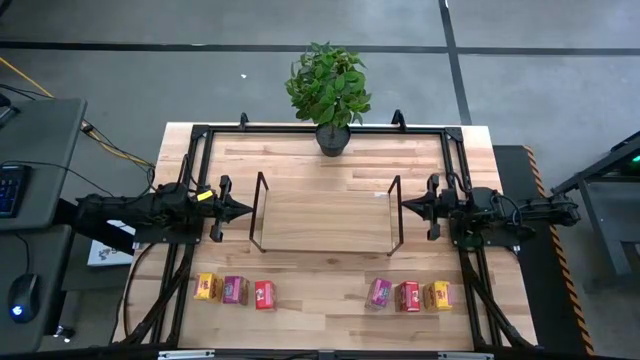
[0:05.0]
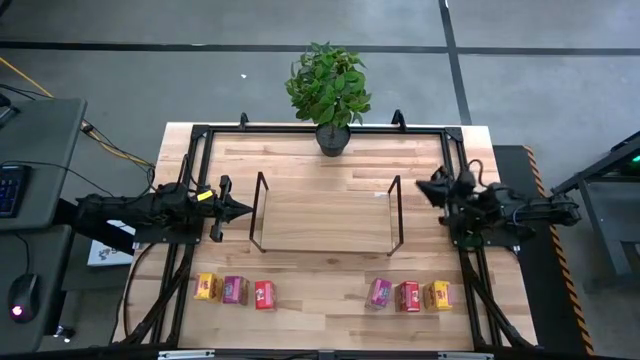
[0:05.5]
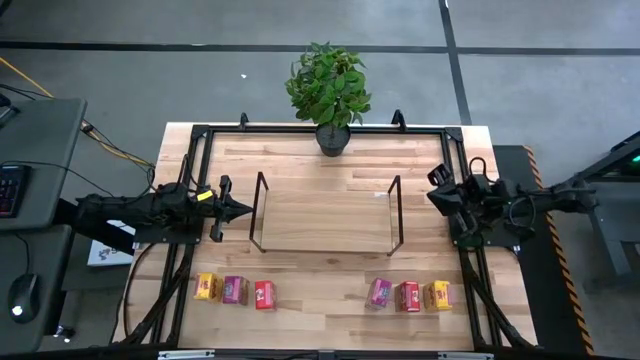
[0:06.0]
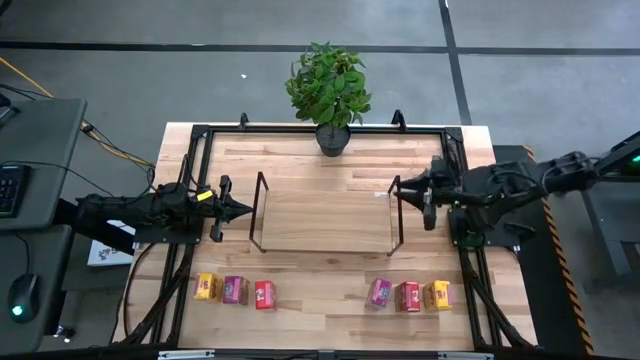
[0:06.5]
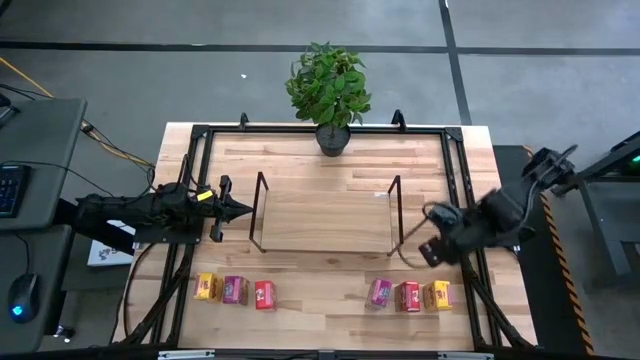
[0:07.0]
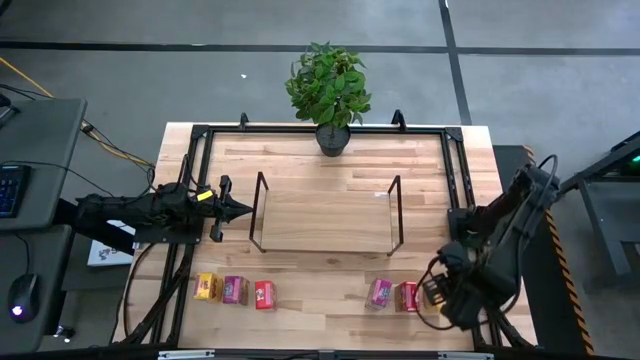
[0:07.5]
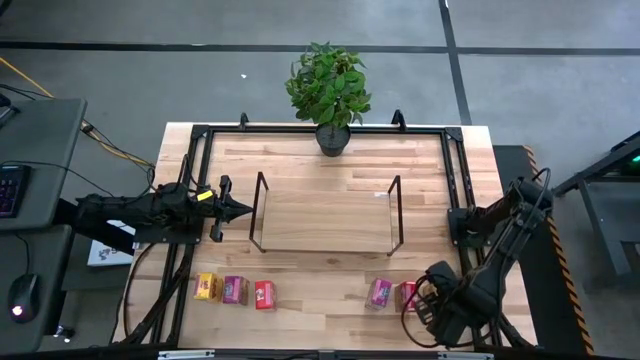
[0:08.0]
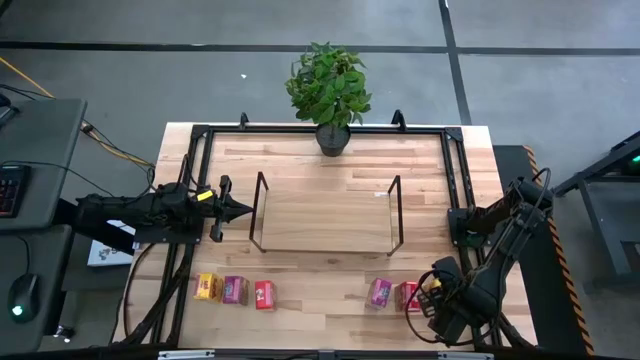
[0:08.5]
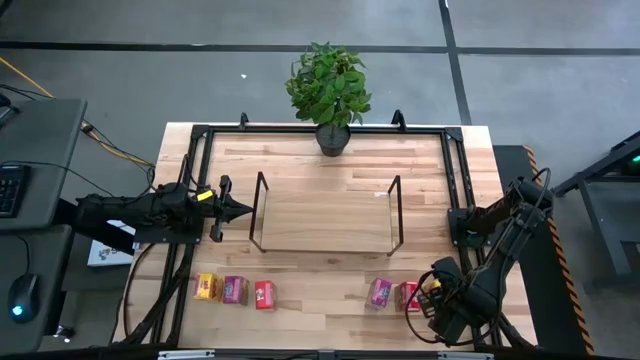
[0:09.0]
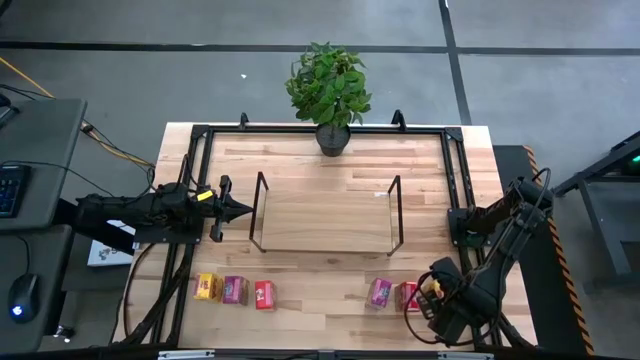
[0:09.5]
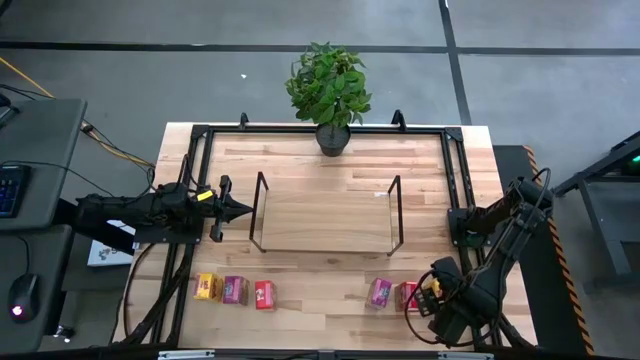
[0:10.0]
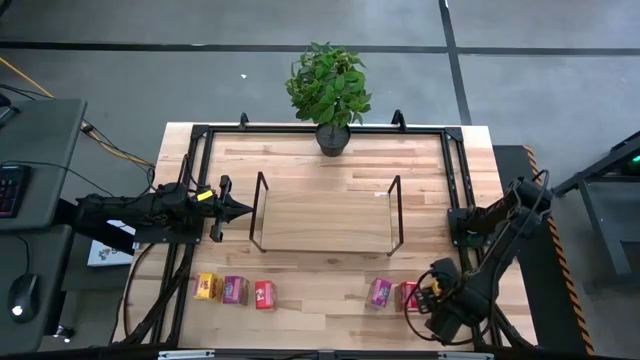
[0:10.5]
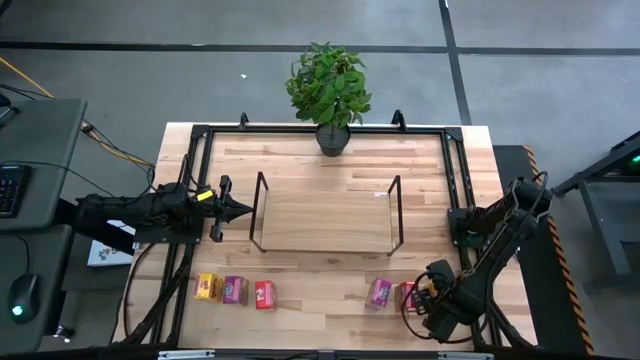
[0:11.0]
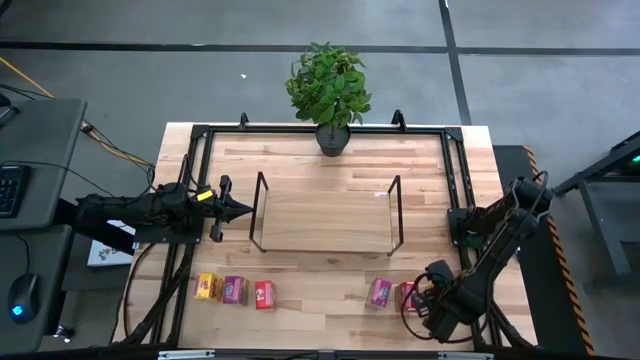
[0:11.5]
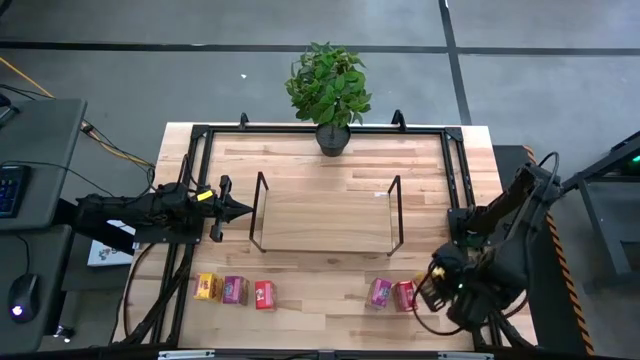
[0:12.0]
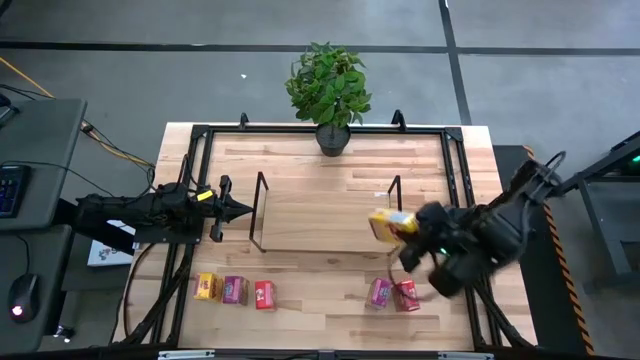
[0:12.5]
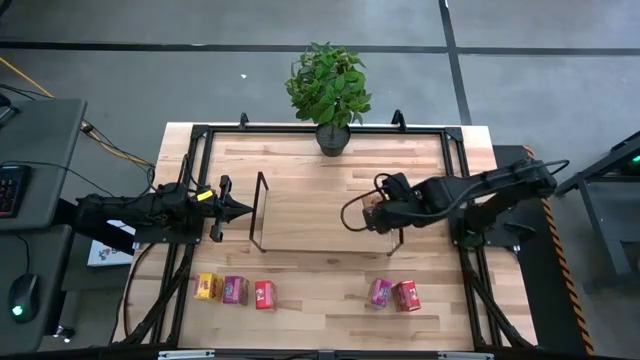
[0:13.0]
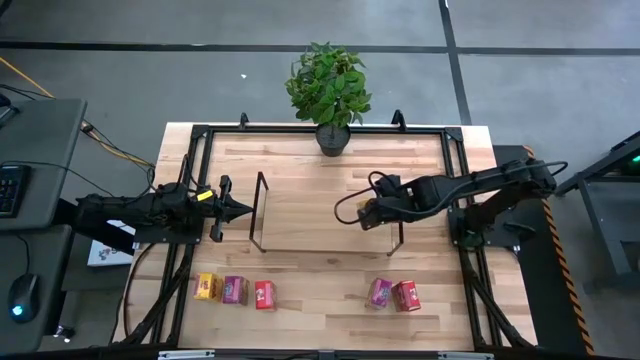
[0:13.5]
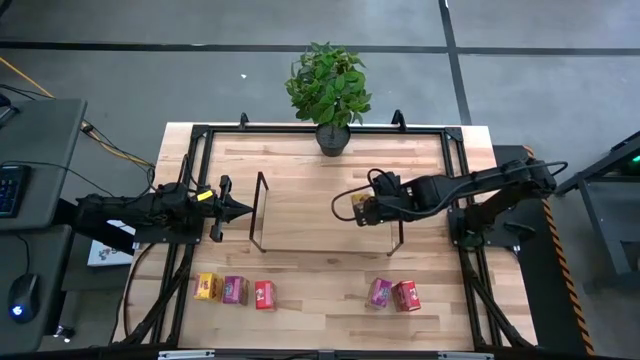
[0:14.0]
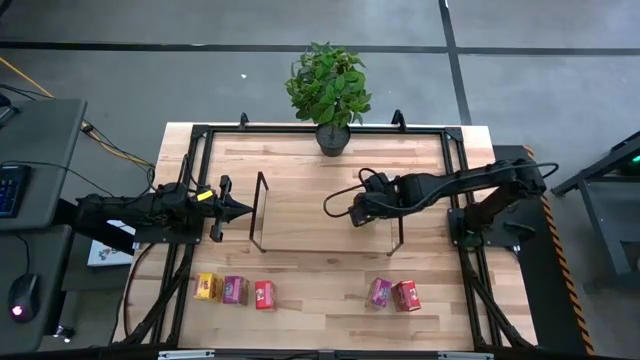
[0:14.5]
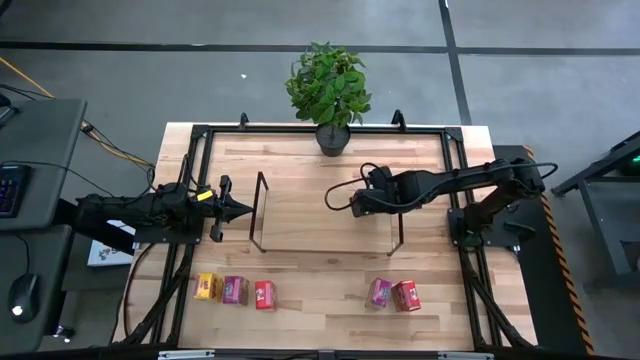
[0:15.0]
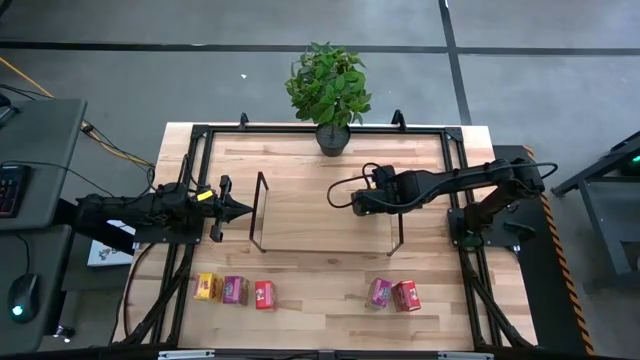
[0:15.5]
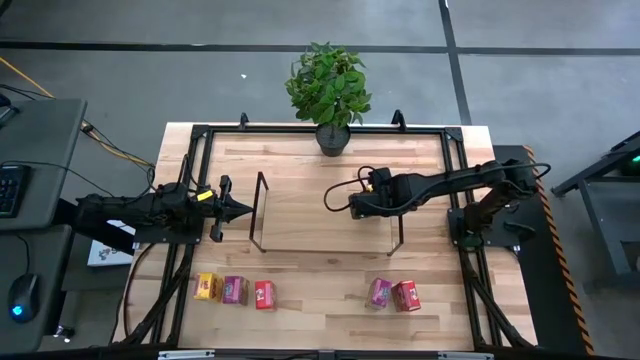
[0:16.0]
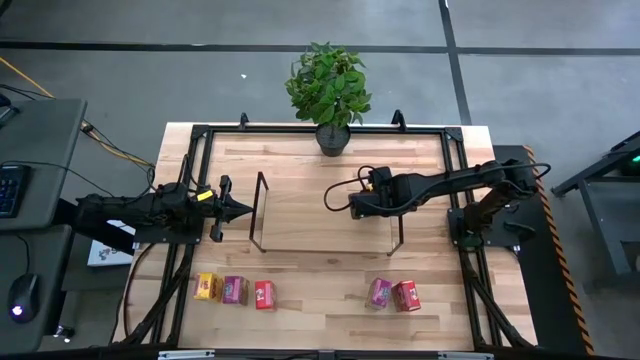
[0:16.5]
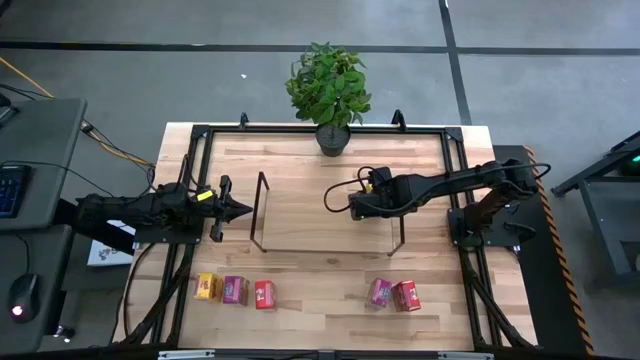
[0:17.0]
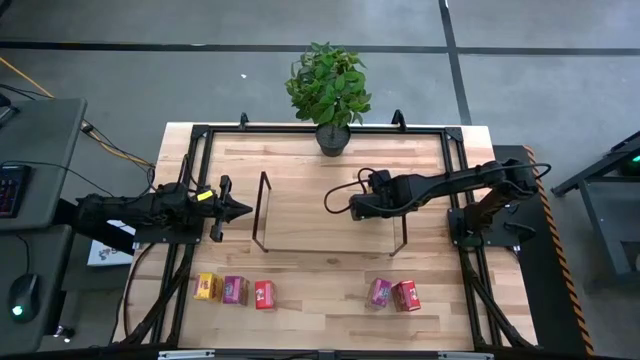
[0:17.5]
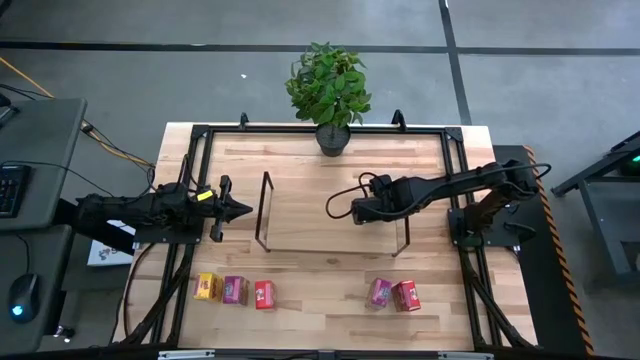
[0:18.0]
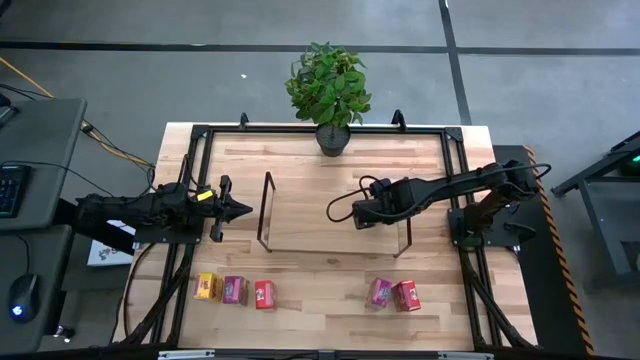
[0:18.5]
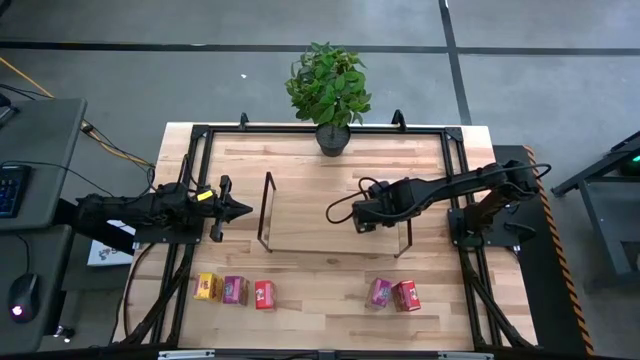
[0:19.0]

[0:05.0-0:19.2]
Task: Stack cereal on shelf
Put the right yellow cereal box on the shelf

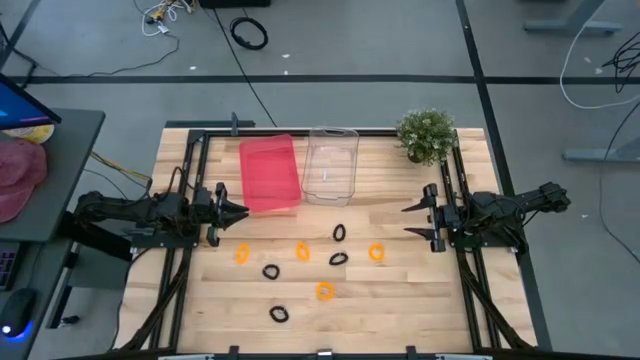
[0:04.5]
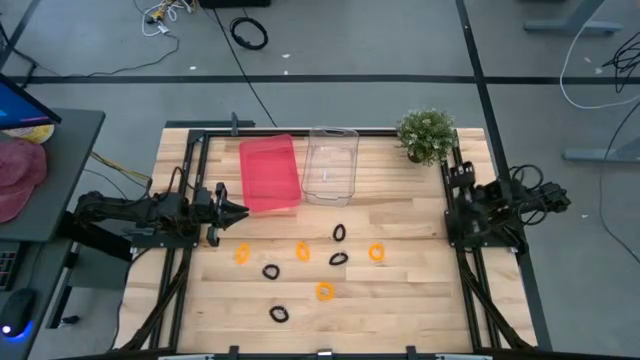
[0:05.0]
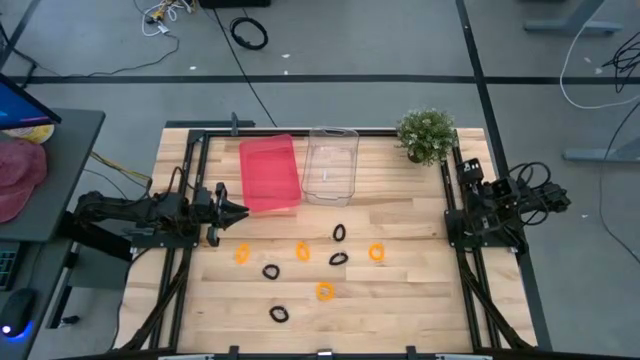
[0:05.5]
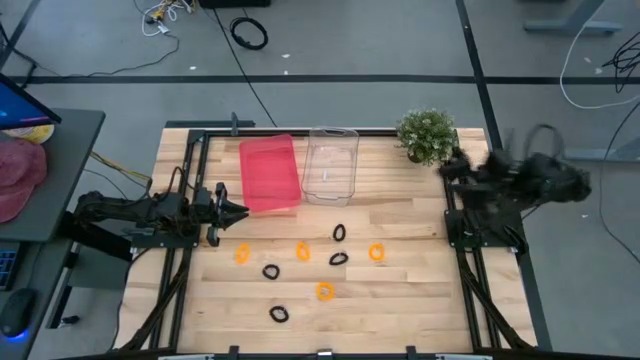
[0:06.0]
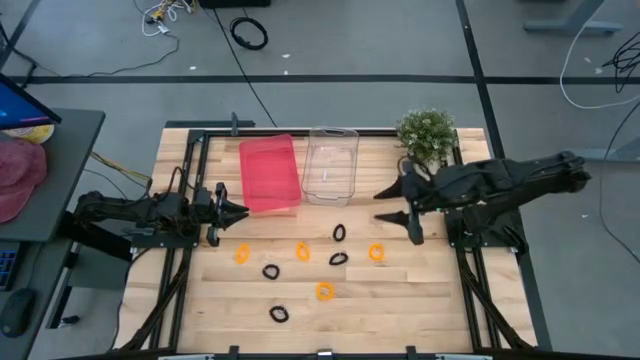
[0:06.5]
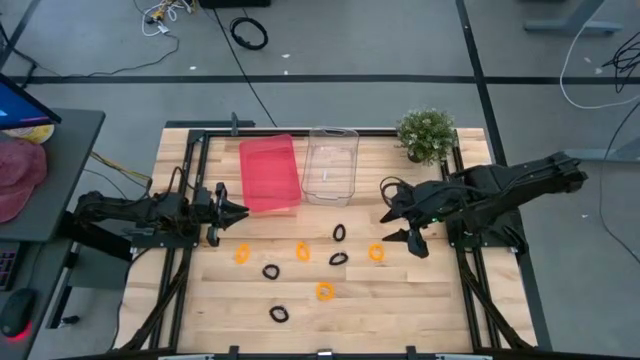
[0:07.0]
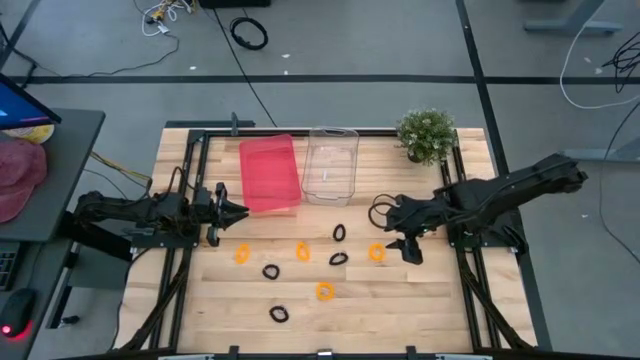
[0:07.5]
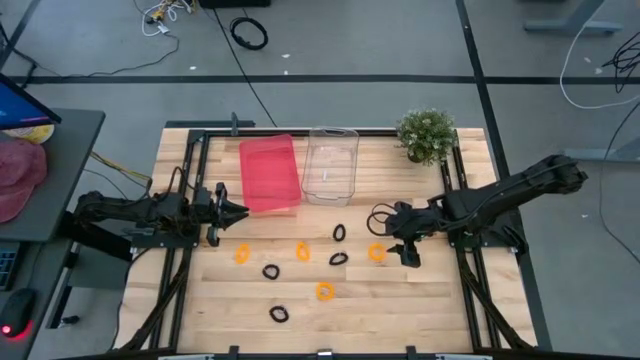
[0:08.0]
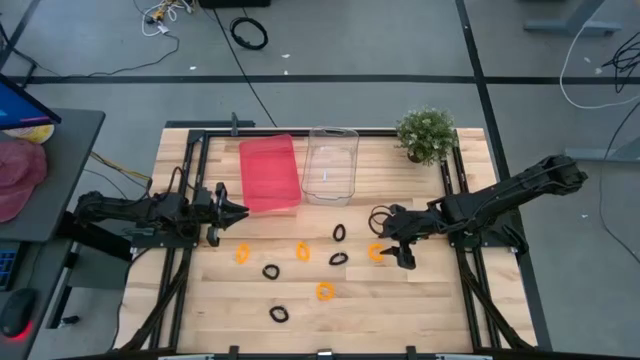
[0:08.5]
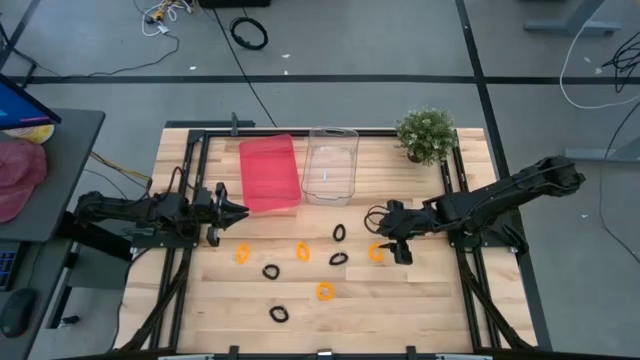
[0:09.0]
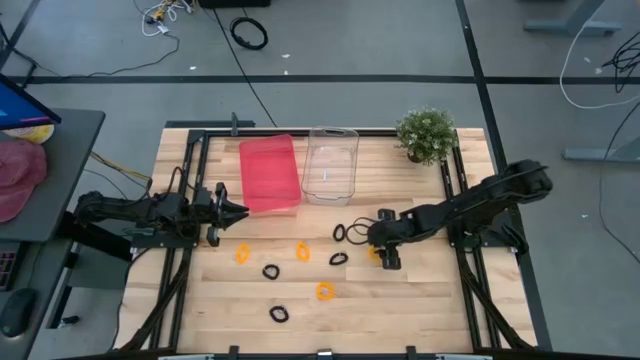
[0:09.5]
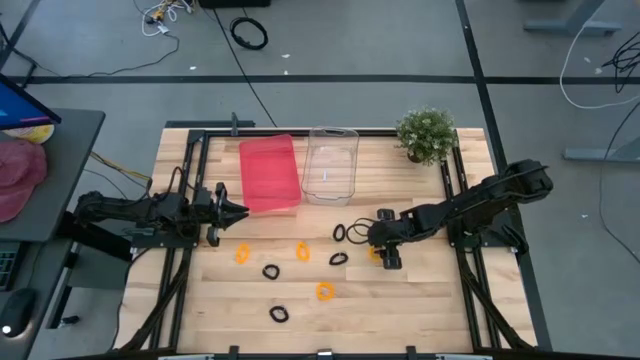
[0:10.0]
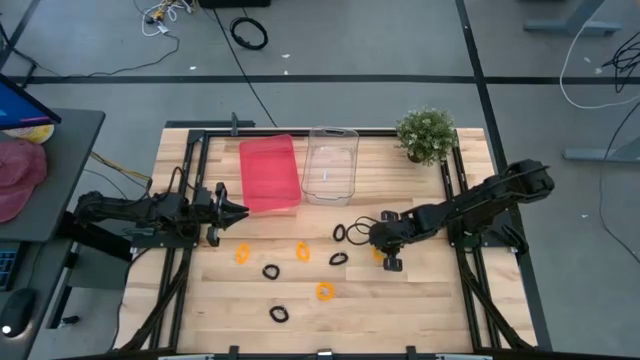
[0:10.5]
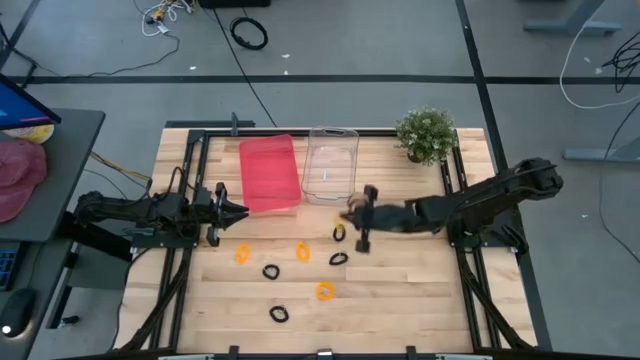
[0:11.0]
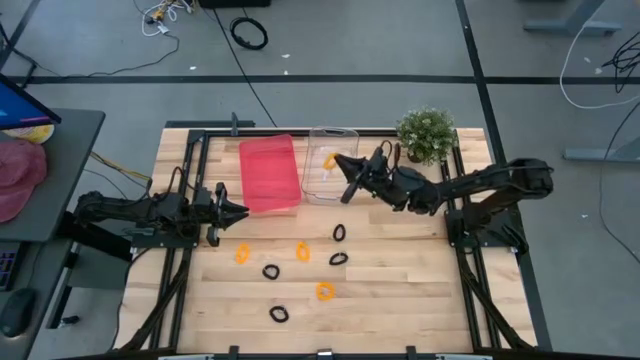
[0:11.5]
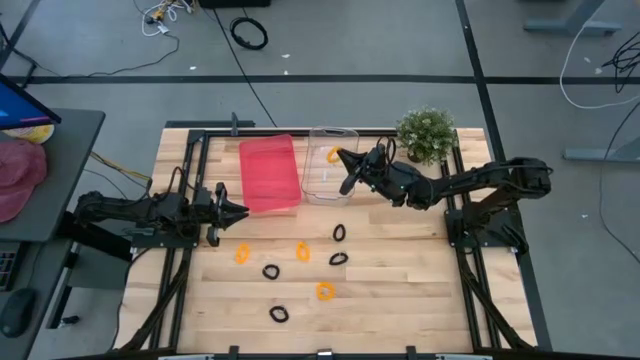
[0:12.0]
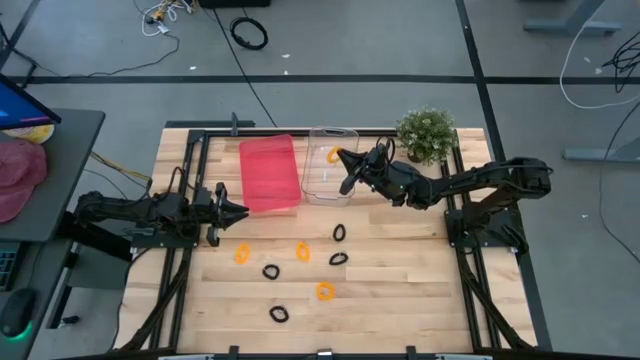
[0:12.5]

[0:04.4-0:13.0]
Task: Sort spring keychains
Put the yellow spring keychain into the transparent bin
